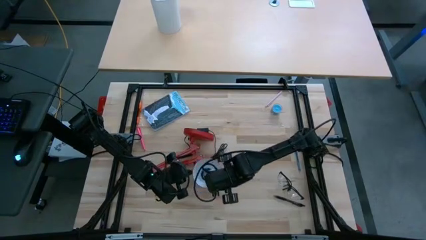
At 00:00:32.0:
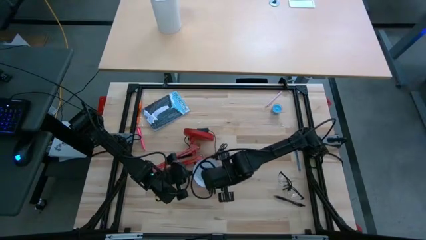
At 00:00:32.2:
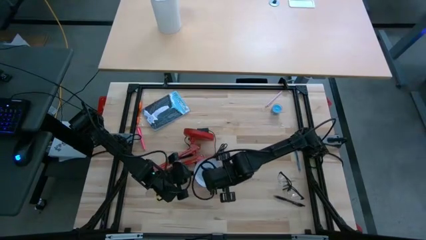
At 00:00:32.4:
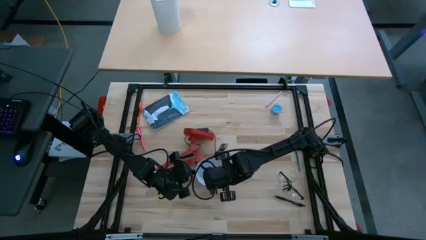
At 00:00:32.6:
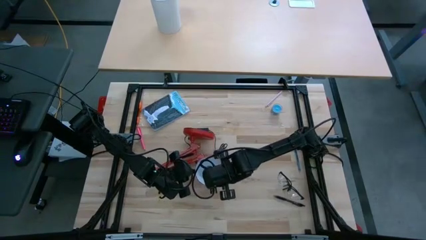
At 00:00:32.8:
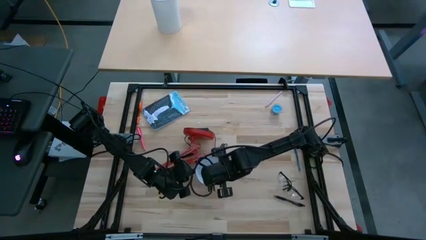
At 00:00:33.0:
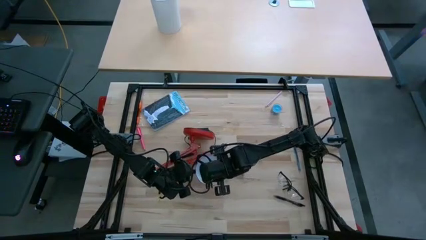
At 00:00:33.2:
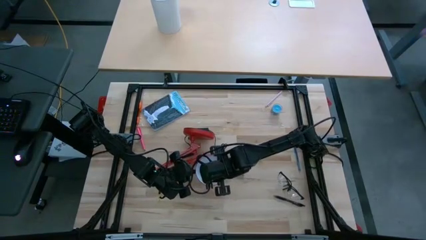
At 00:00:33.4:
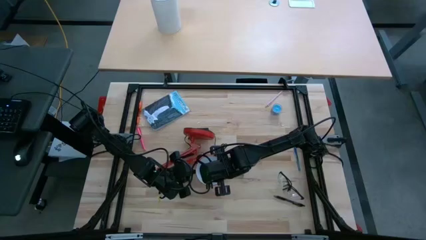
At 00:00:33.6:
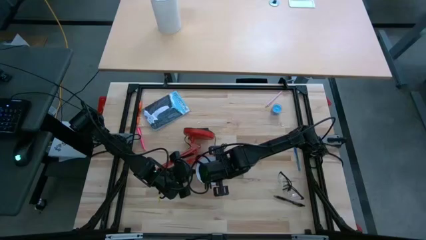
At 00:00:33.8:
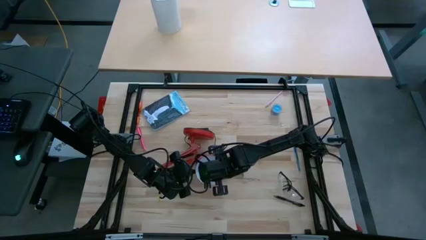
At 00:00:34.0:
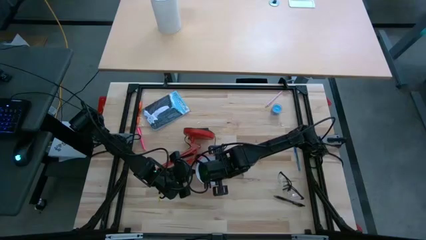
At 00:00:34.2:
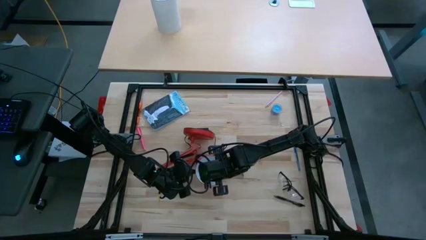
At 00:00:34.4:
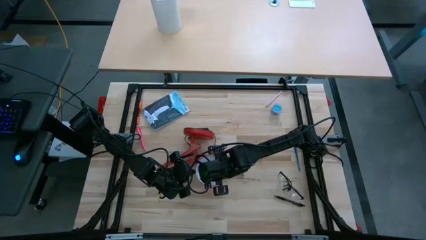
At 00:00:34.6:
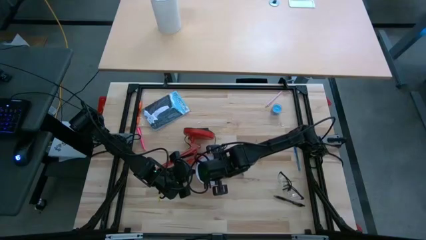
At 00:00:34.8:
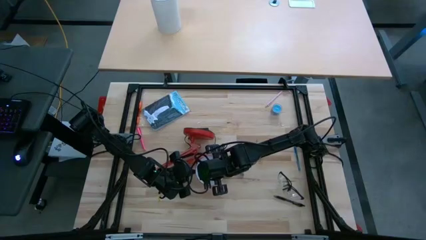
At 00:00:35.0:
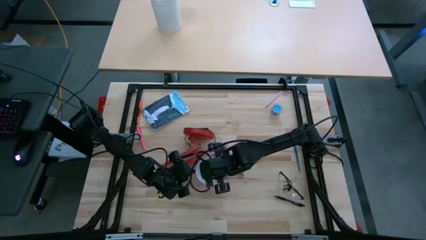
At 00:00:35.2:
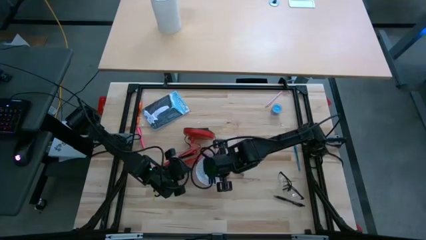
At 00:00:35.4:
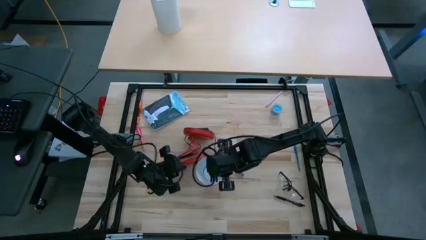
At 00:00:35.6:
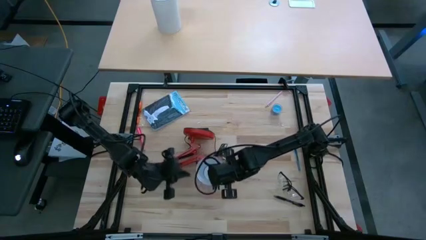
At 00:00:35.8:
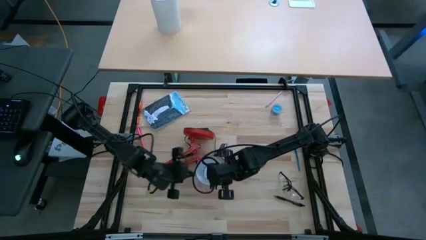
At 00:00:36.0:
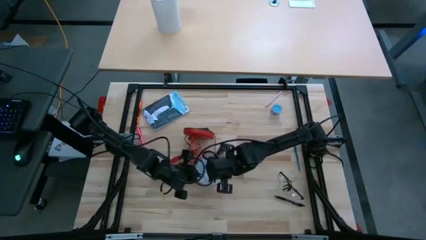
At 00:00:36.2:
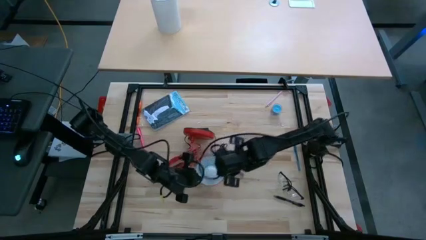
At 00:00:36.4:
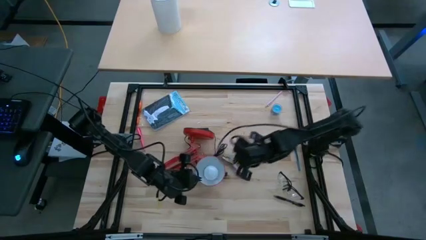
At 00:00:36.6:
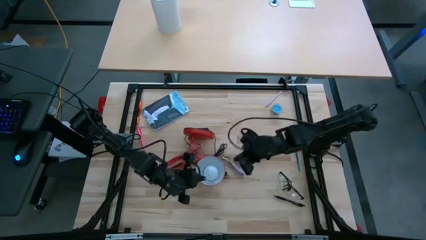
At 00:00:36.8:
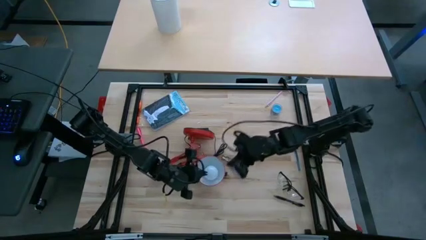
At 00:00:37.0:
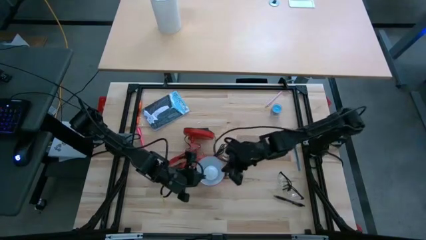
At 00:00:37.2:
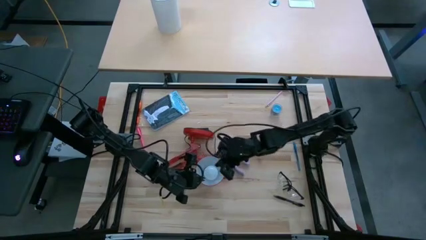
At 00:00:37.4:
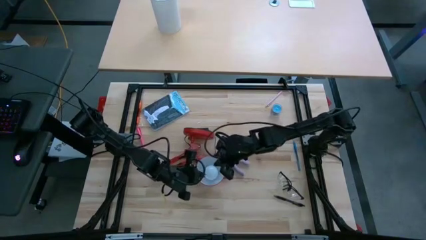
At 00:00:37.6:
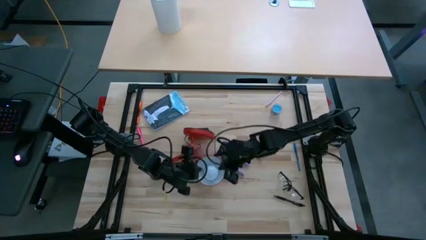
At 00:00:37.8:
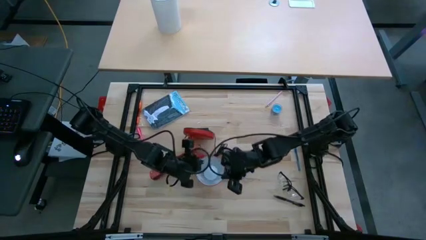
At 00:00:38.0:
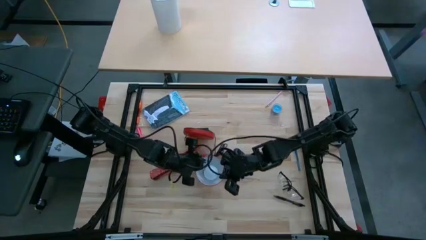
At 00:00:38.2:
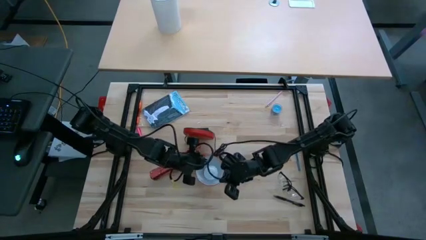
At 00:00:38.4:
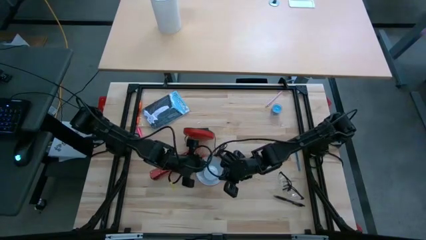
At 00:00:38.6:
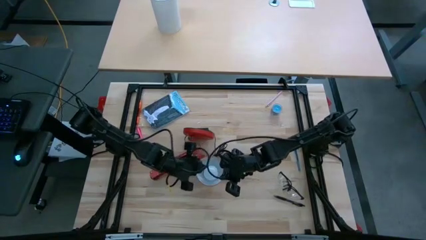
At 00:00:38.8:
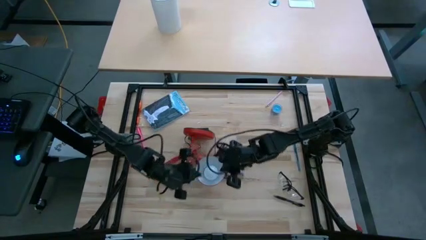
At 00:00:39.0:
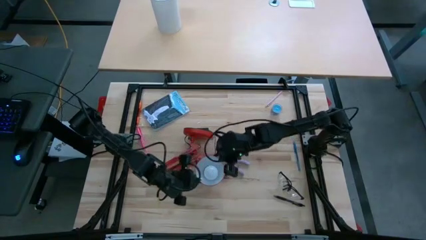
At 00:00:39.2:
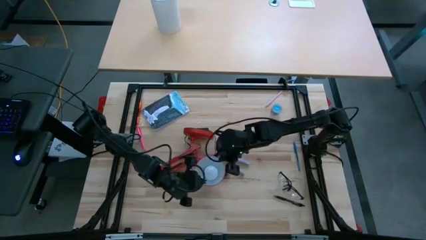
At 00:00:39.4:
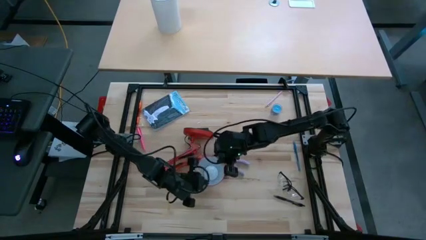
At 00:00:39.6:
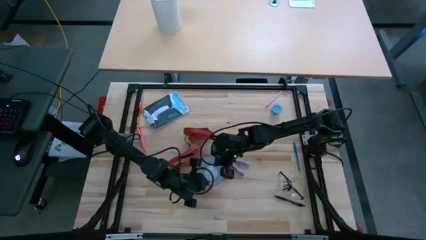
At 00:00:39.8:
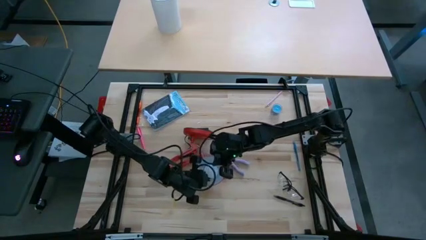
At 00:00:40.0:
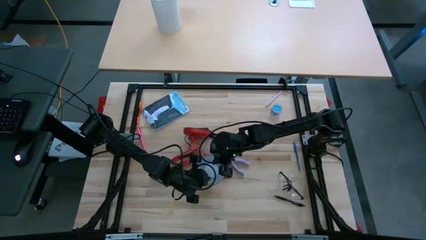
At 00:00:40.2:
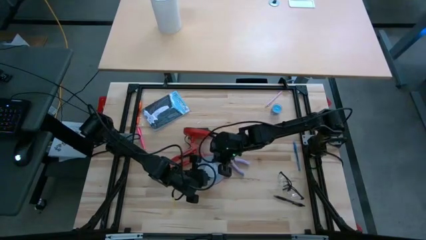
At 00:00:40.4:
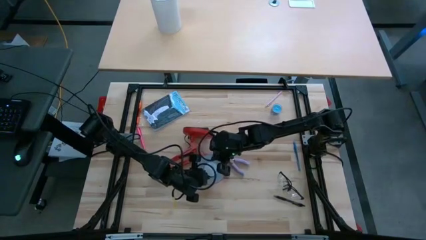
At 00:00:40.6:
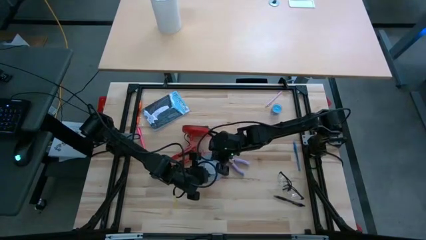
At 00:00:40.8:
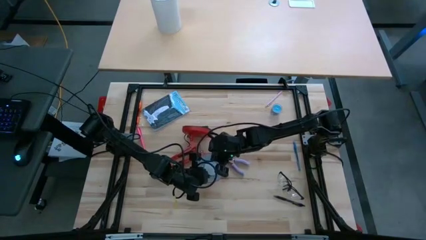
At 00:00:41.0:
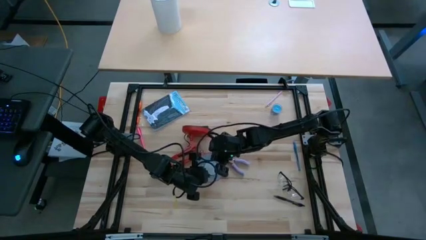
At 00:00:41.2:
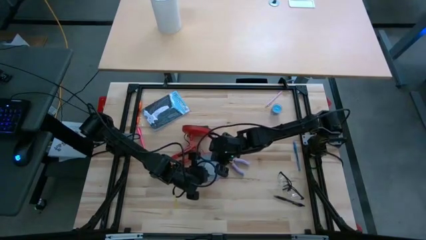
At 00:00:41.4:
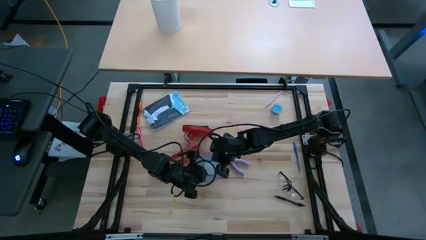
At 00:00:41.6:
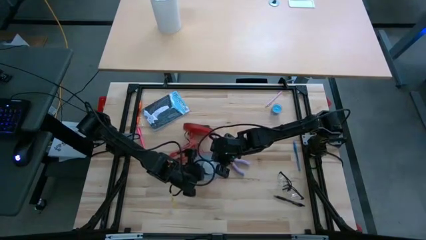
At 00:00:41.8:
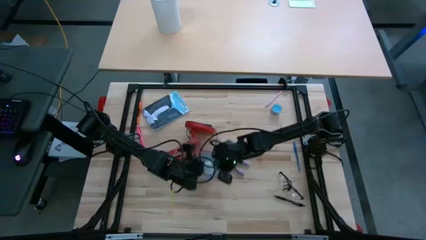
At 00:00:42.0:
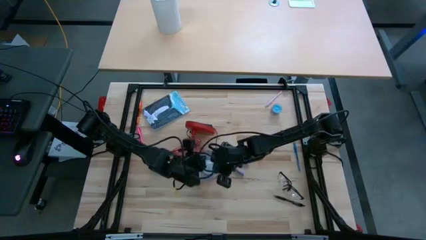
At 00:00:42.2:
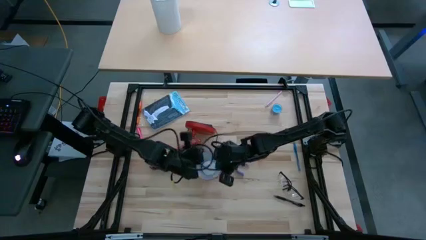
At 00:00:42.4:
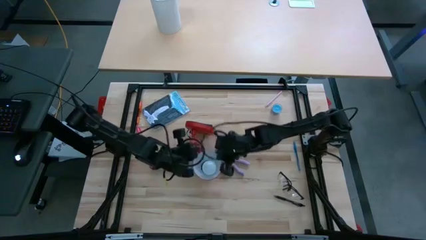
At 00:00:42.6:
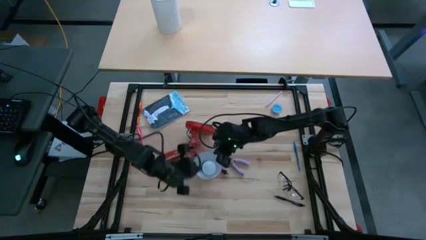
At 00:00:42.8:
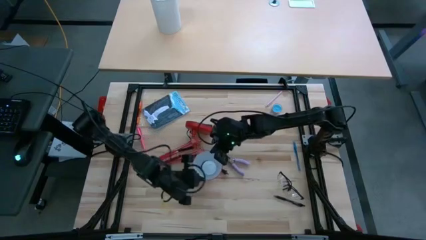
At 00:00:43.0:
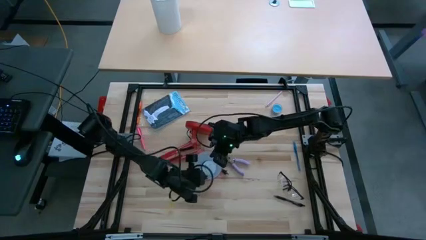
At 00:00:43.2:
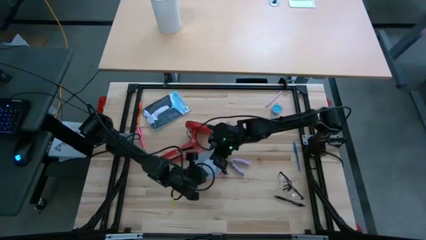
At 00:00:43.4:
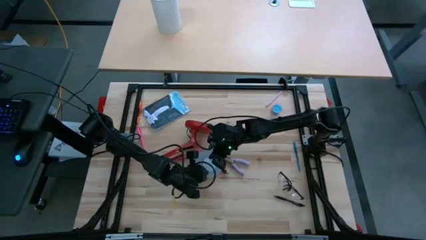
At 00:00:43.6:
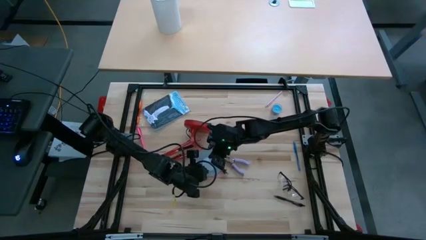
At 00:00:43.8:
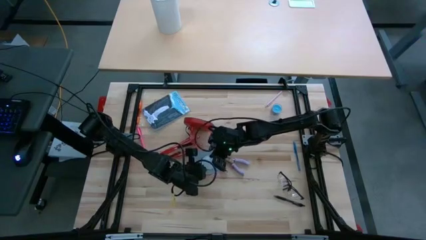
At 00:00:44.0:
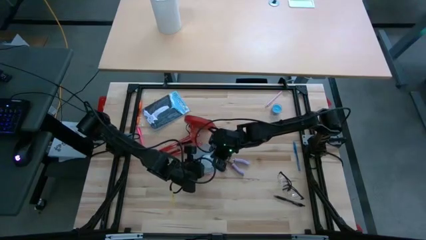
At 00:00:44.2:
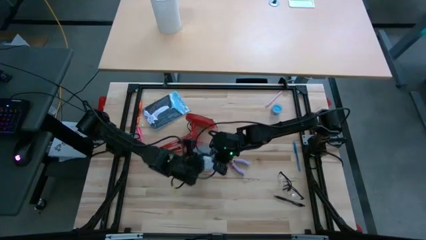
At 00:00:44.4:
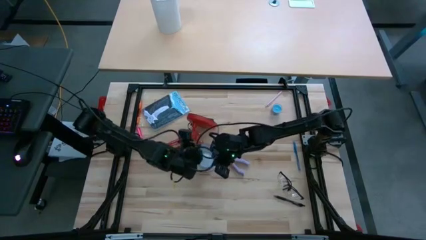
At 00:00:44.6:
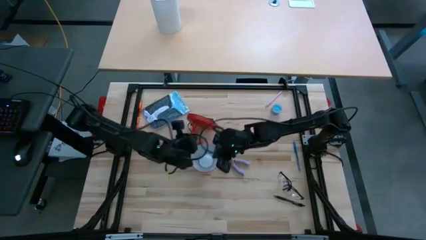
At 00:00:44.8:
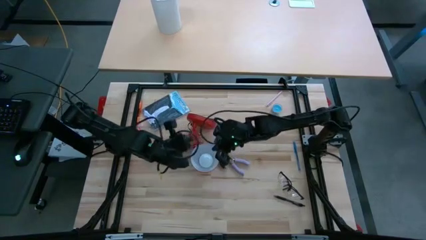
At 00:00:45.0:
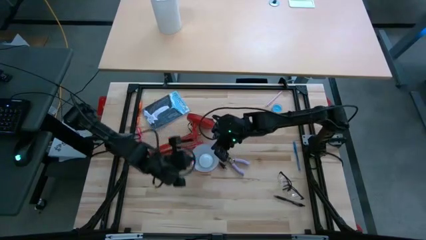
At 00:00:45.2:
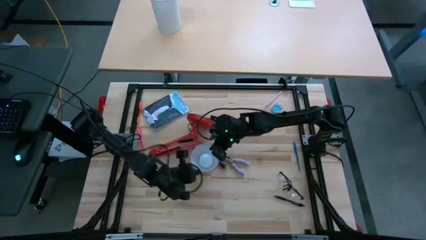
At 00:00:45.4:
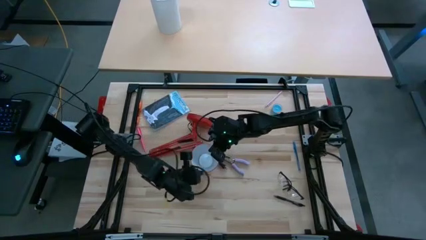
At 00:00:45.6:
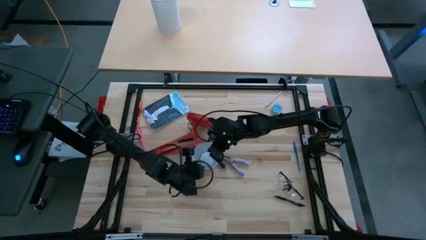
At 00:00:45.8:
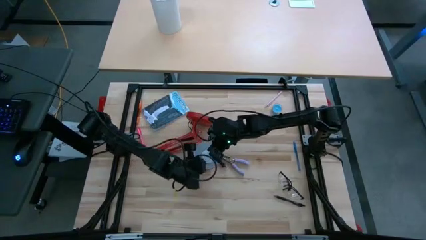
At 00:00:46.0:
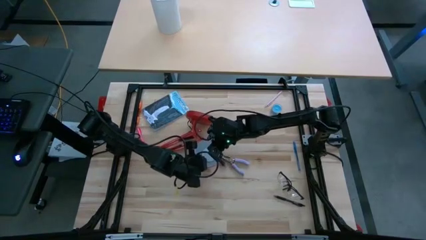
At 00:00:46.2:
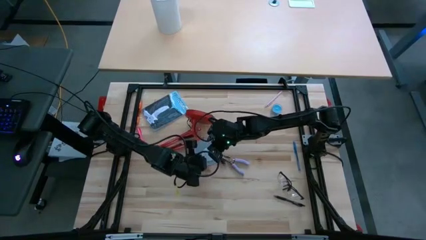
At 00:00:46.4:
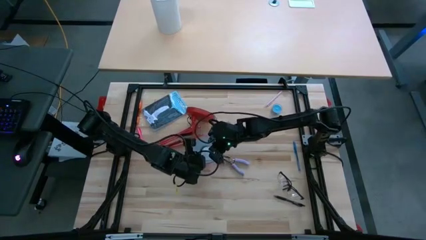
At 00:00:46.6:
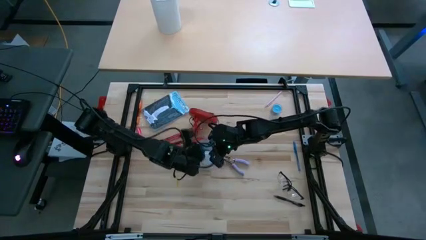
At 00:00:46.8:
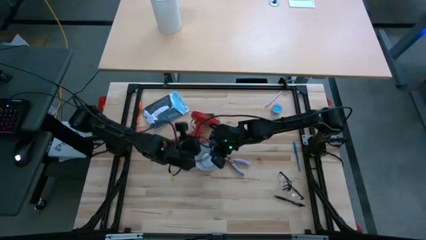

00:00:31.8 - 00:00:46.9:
Task: Screw lightbulb
Insert the lightbulb into the red desk lamp
